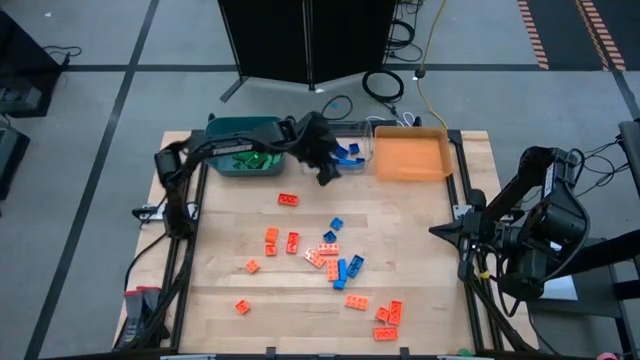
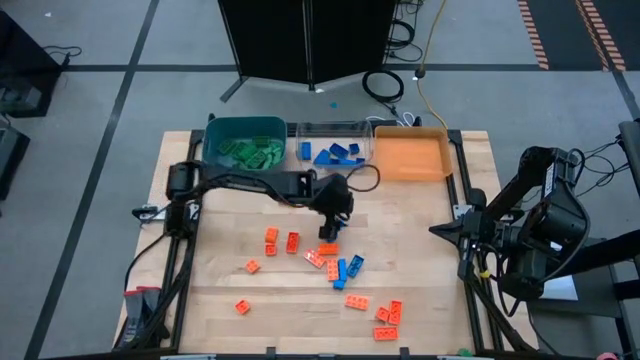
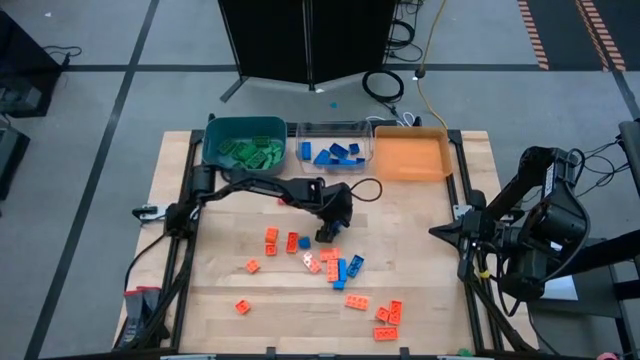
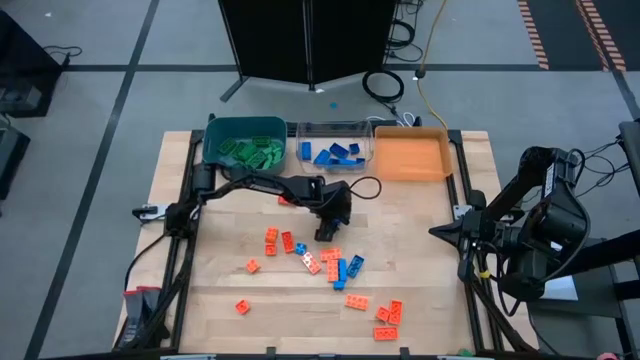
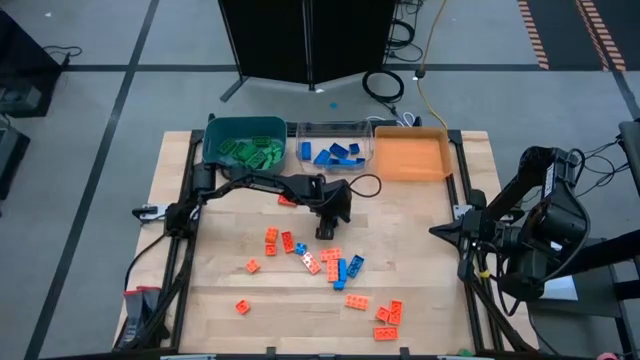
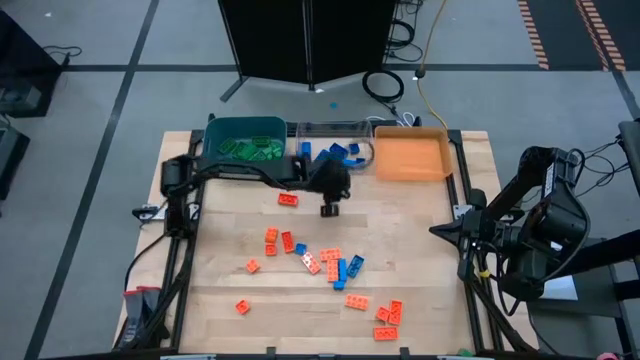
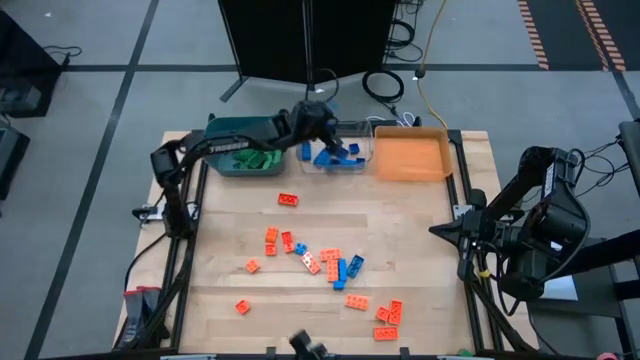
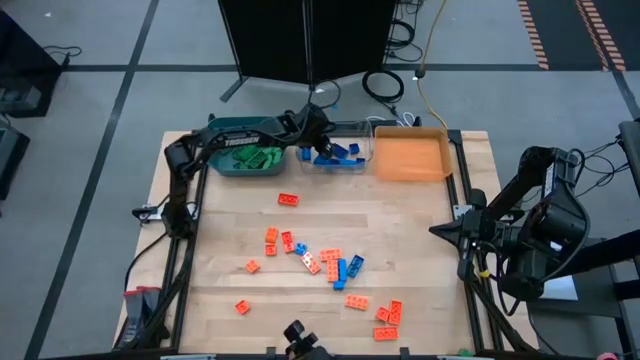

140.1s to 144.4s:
Task: Sort blocks
Put the blue game piece into the transparent bin

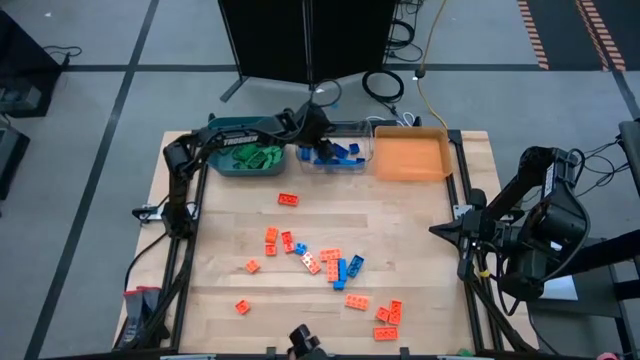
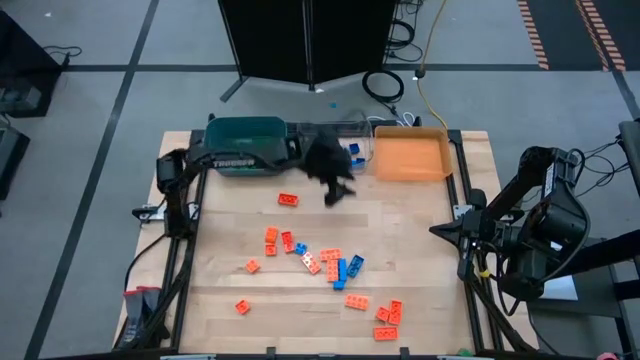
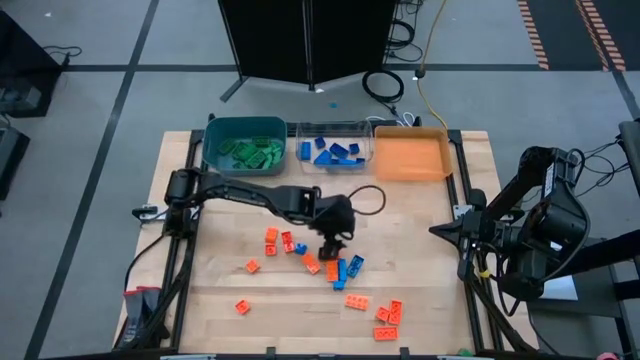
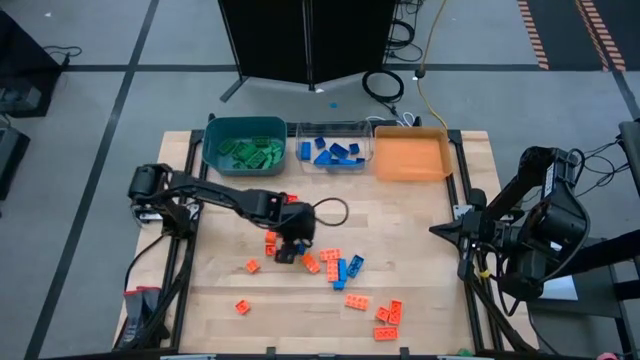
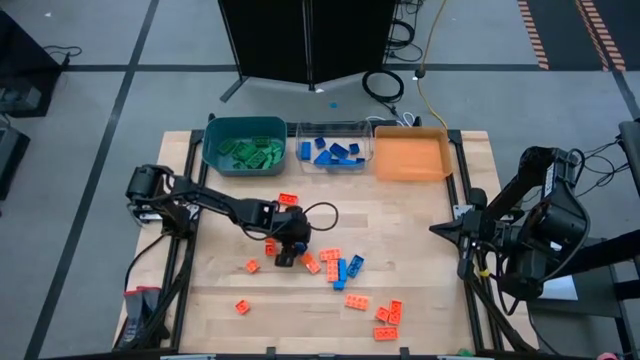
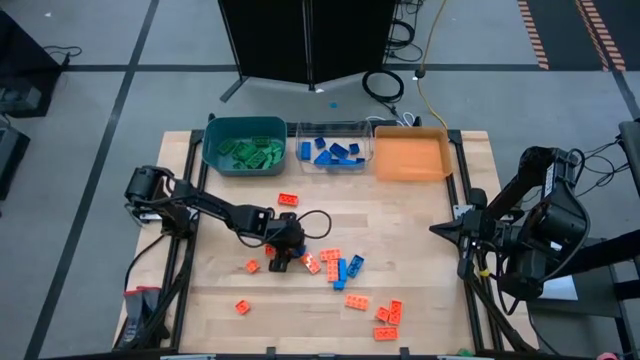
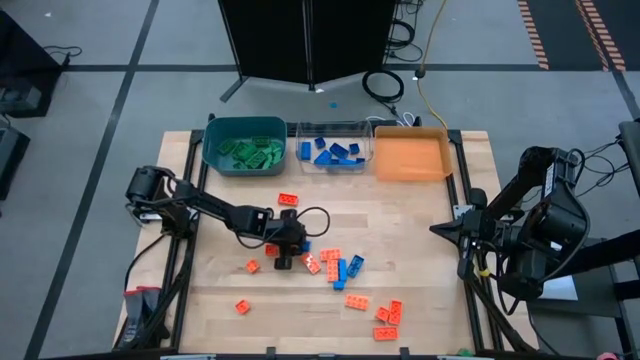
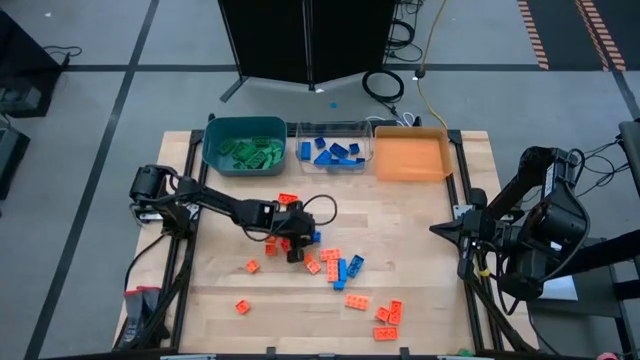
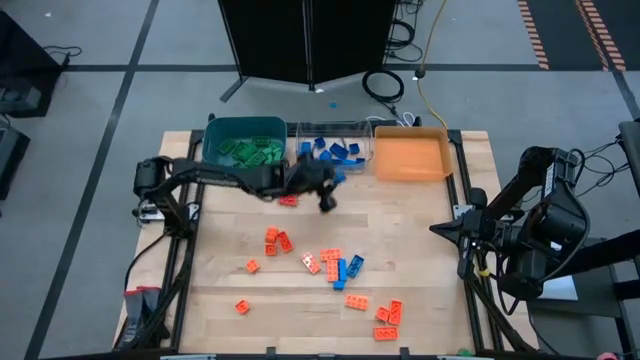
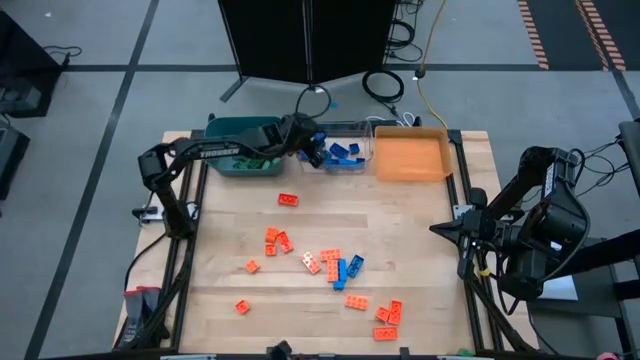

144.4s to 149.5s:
Put the blue game piece into the transparent bin

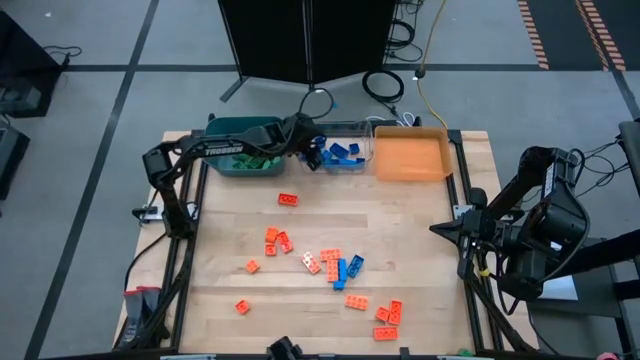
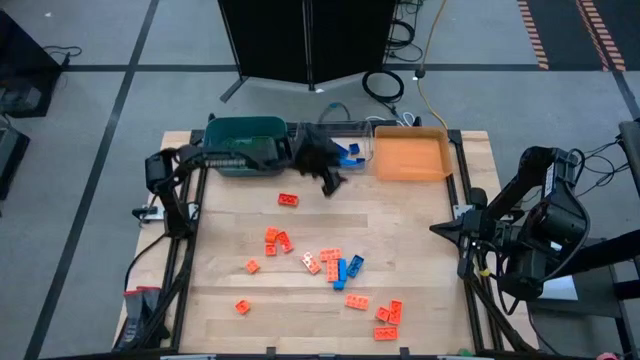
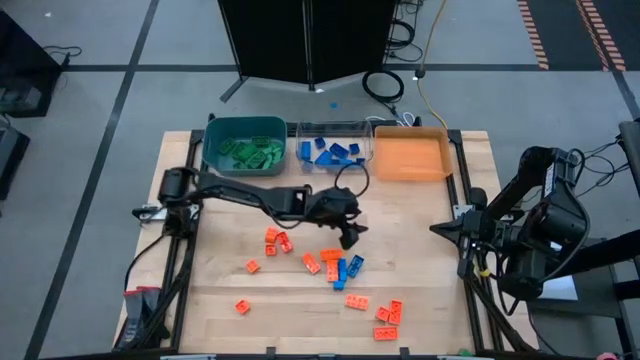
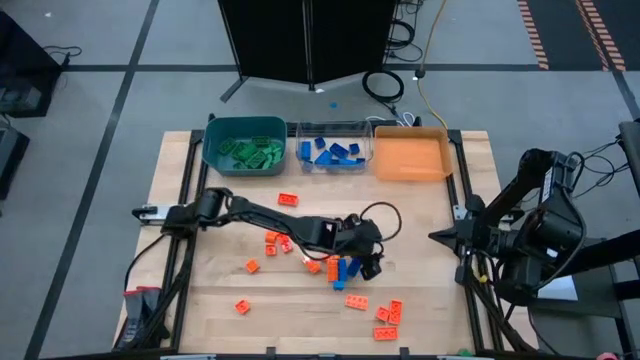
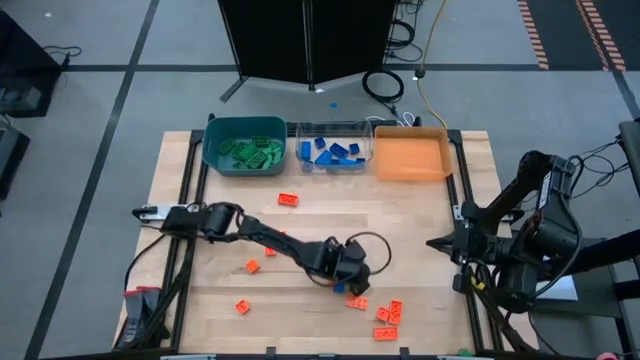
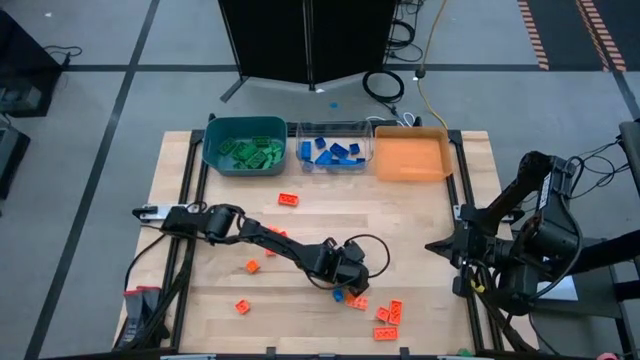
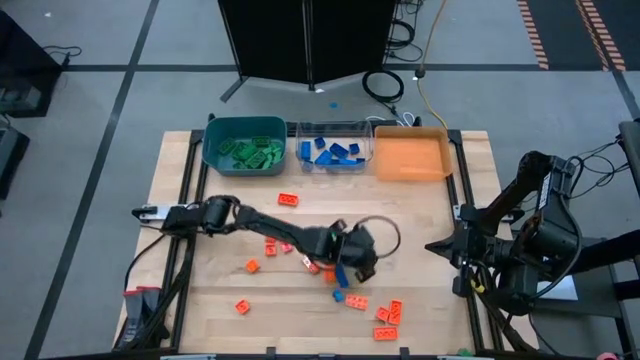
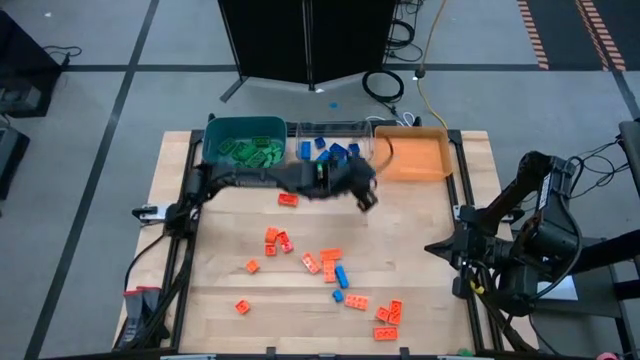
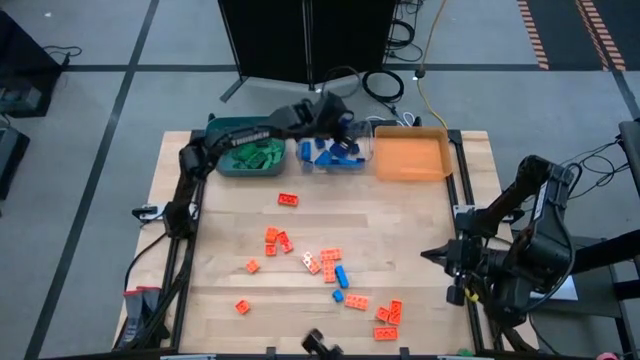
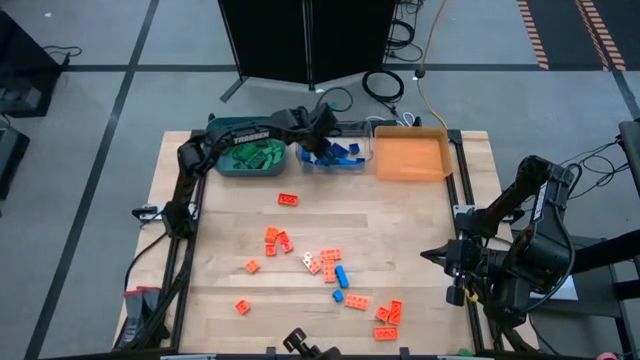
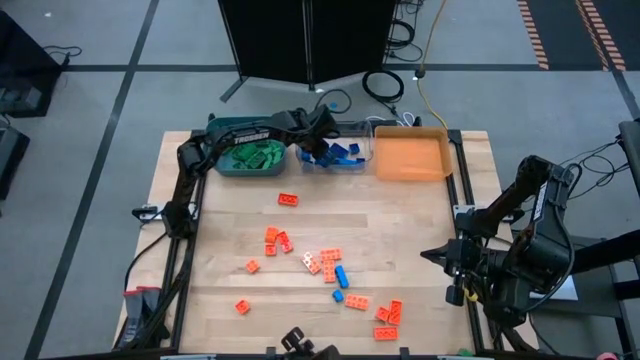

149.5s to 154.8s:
Put the blue game piece into the transparent bin

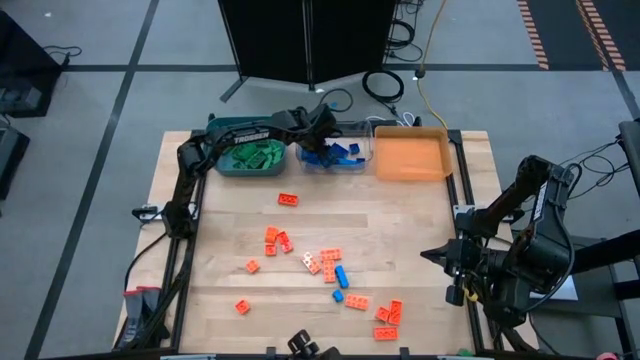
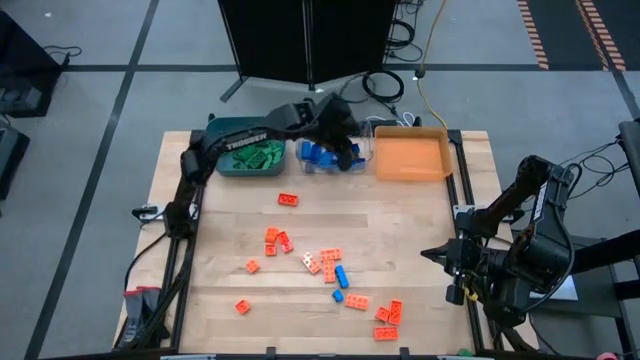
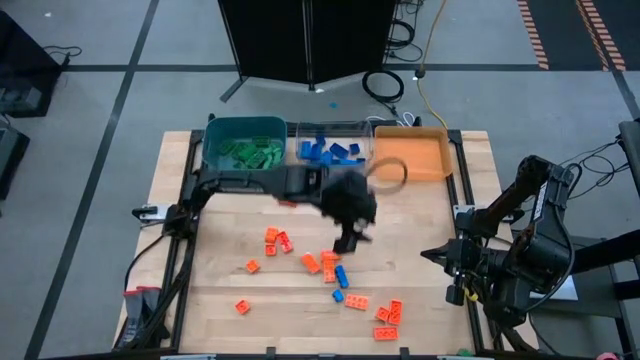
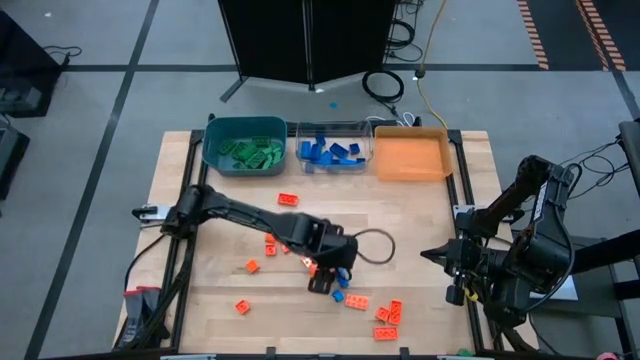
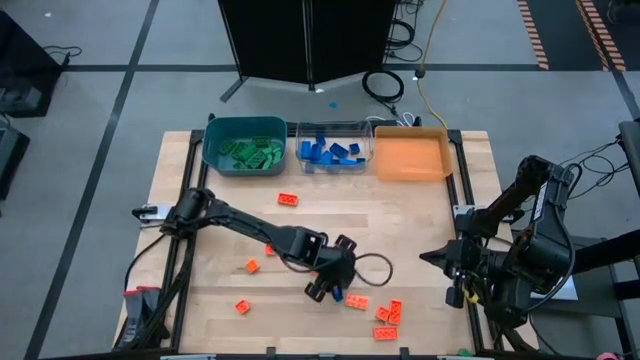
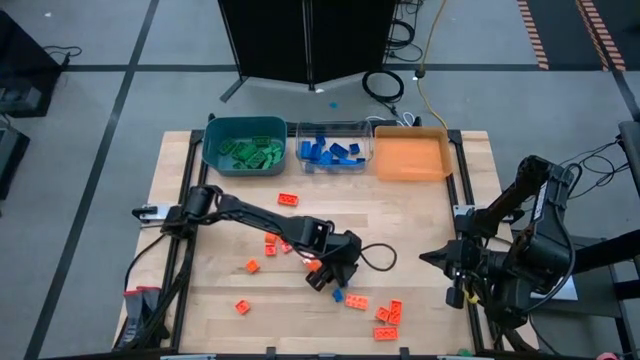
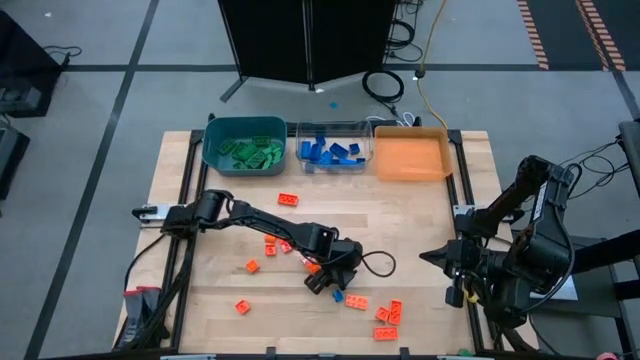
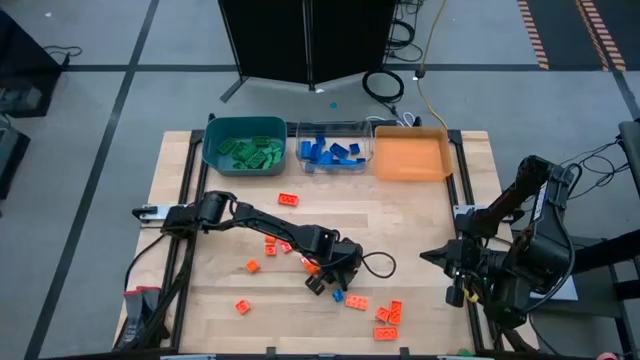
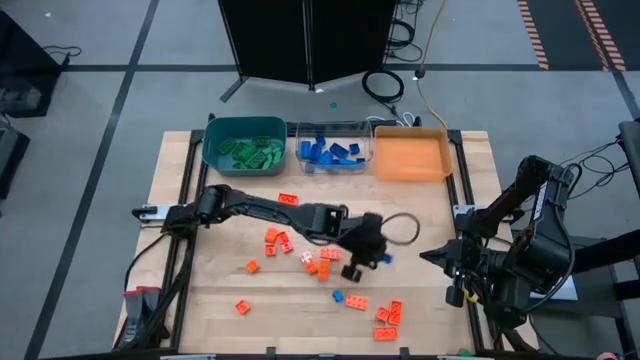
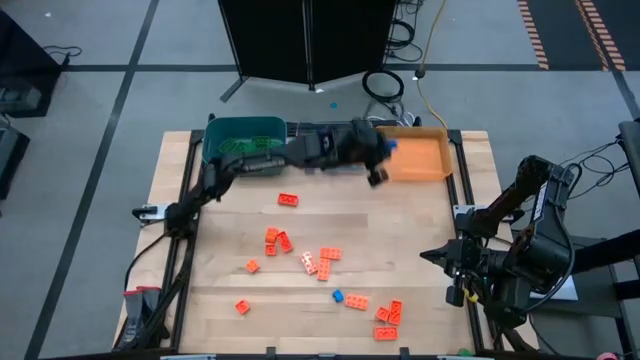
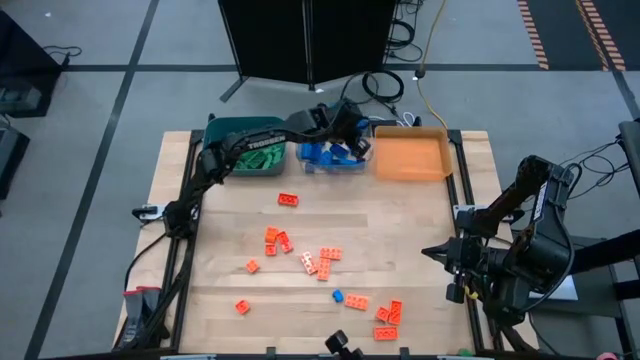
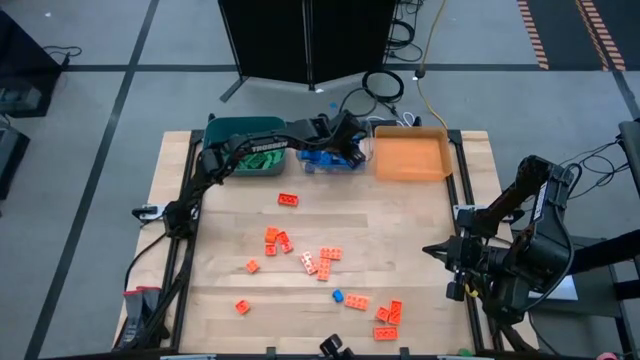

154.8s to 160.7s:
Put the blue game piece into the transparent bin
